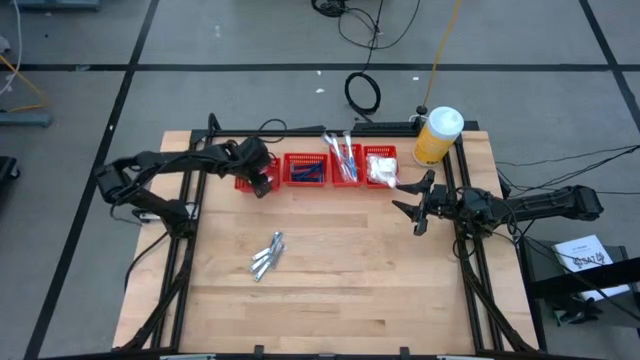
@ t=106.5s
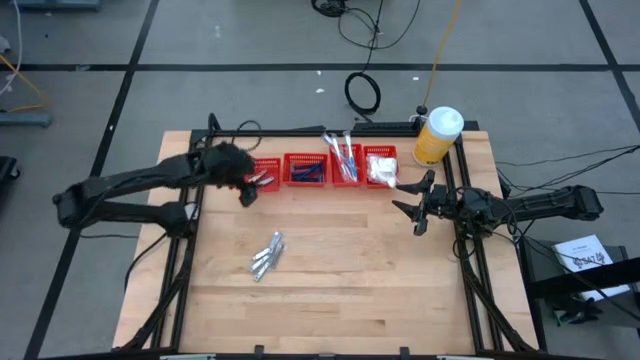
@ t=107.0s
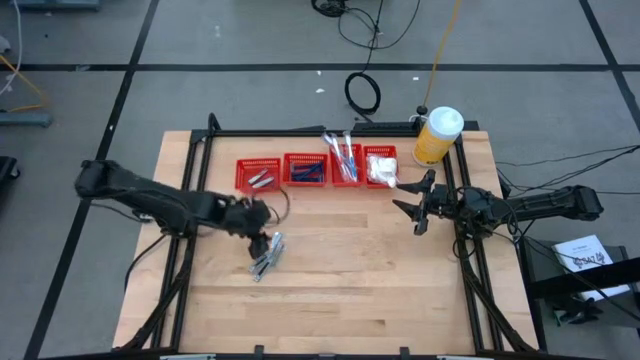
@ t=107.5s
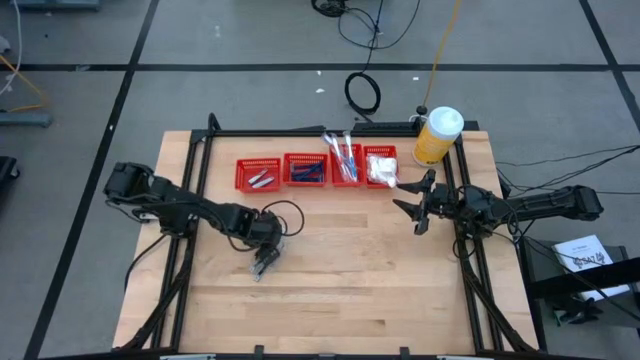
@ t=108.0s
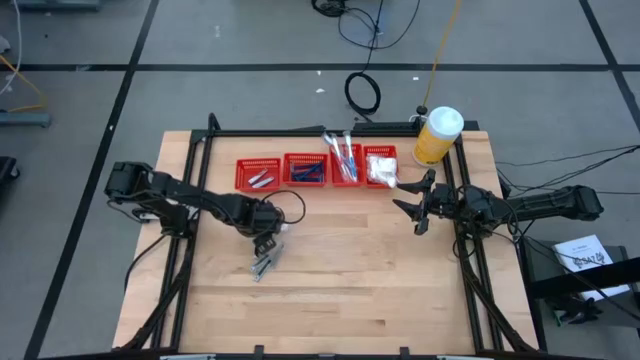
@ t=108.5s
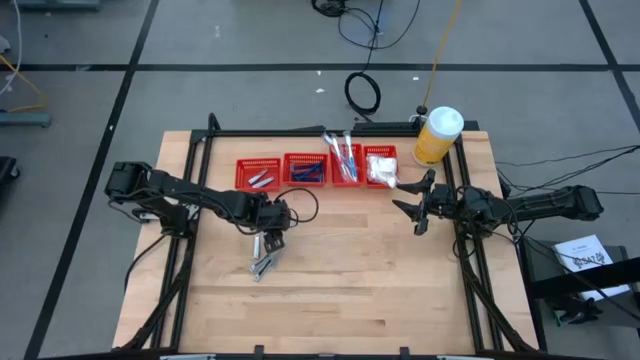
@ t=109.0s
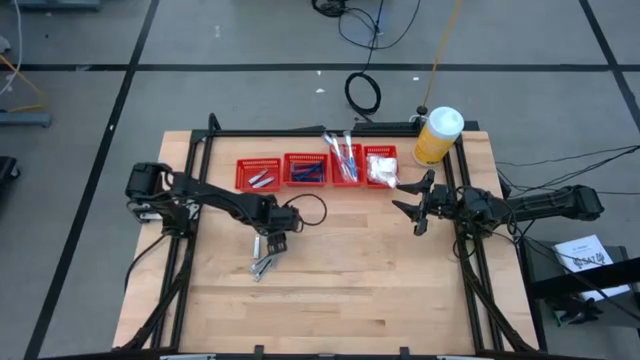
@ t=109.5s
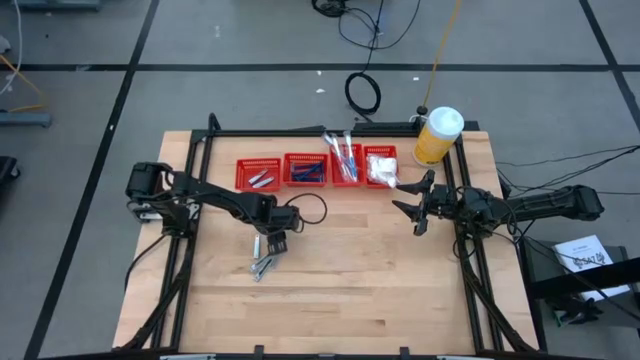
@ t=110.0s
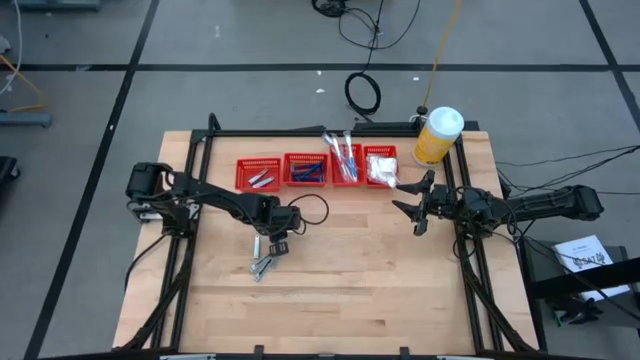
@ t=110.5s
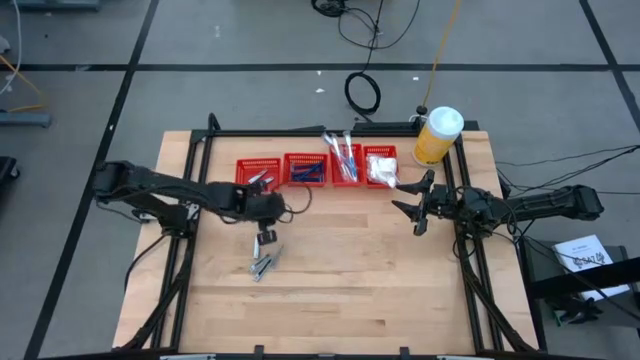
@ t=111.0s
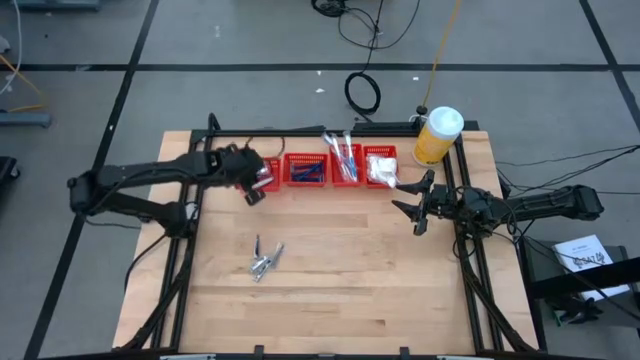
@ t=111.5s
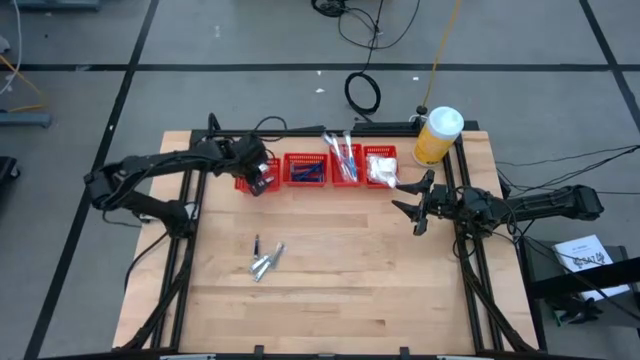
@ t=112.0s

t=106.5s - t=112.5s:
Task: Pick & Place Travel size toiletries
Put the nail cutter into the horizontal left red bin

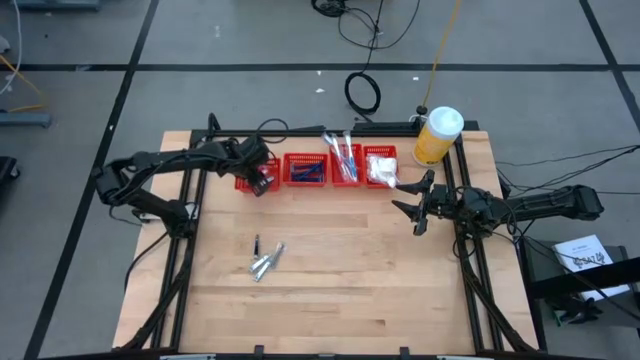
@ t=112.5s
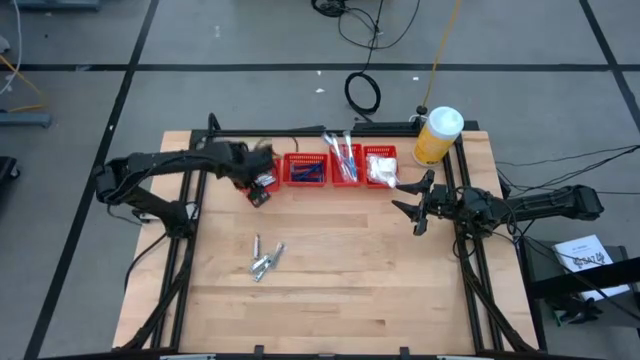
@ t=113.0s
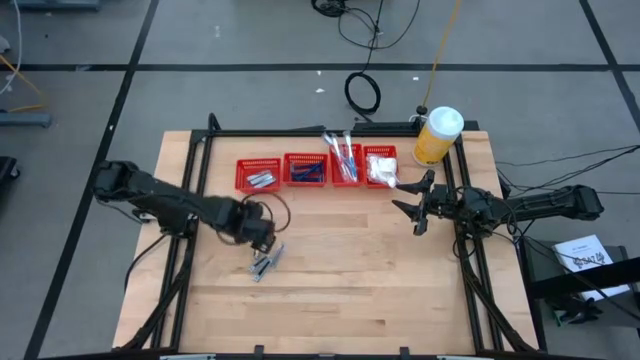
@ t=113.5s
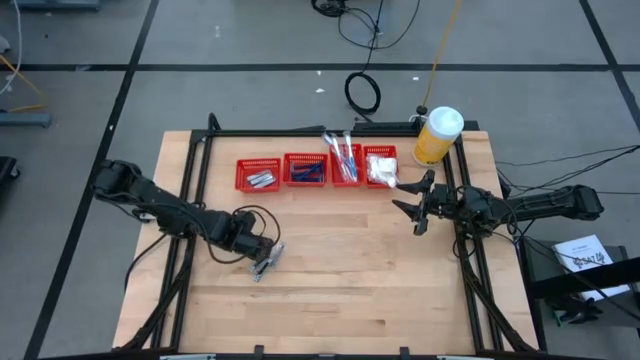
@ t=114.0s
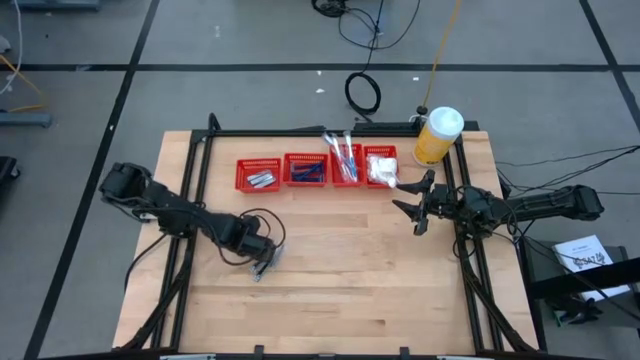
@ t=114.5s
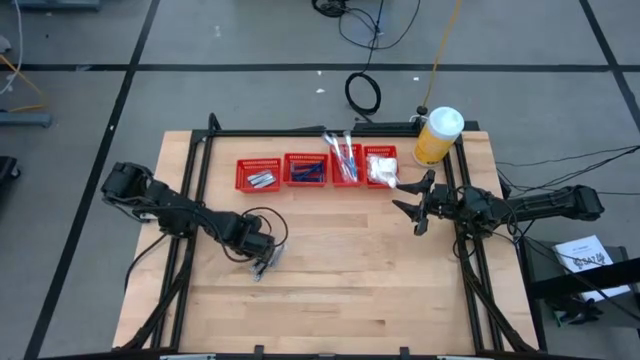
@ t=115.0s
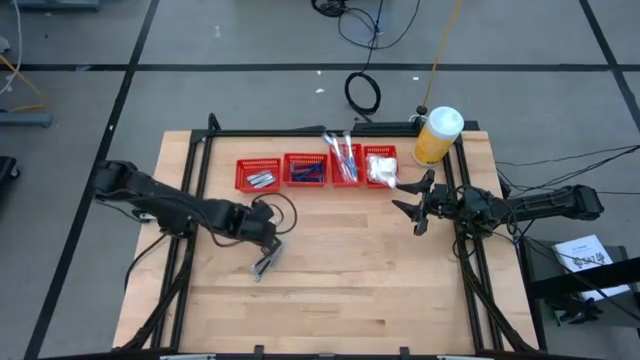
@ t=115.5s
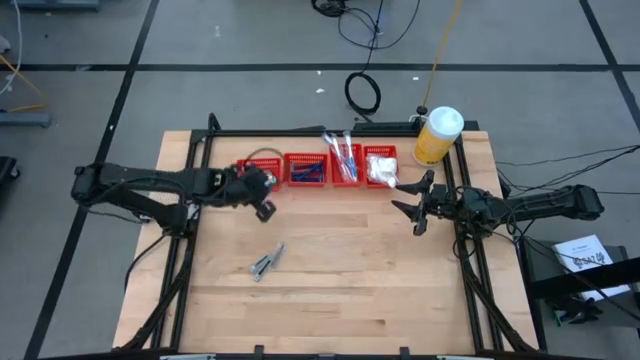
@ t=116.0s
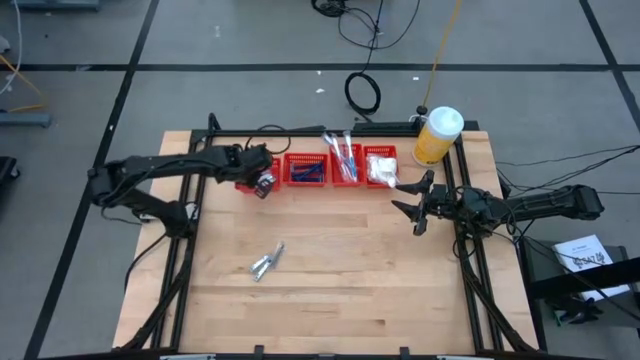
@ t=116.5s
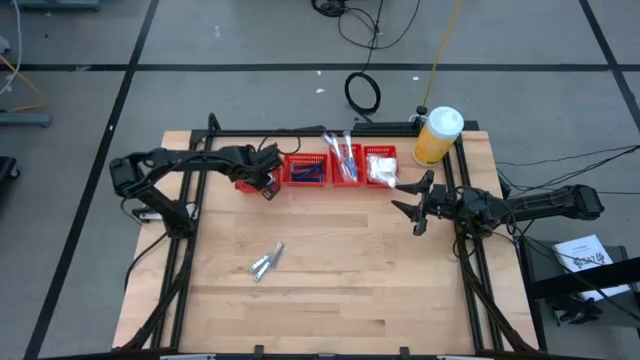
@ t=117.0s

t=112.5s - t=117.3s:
Put the top left nail cutter into the horizontal left red bin

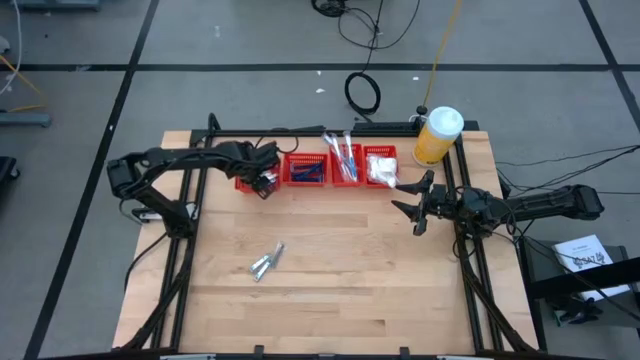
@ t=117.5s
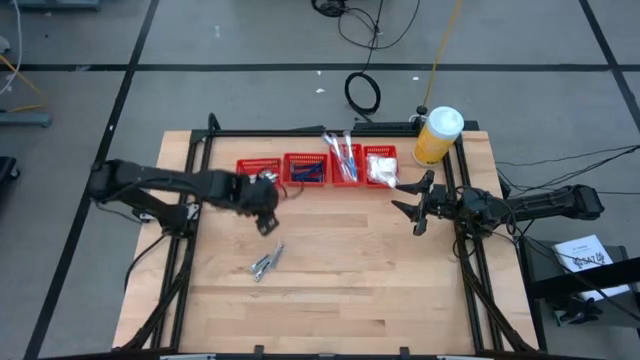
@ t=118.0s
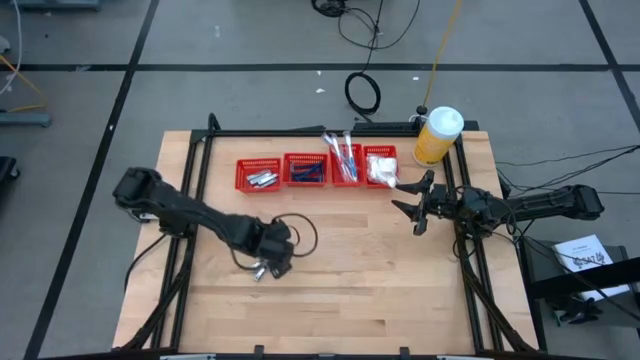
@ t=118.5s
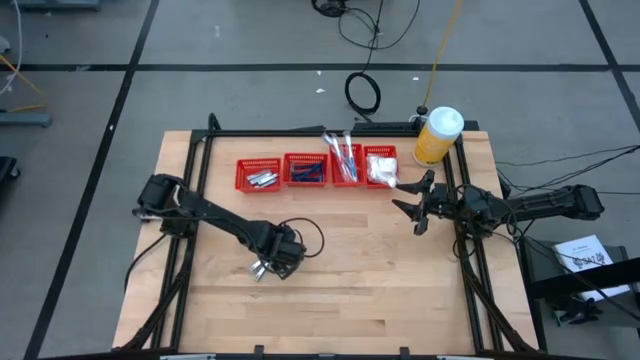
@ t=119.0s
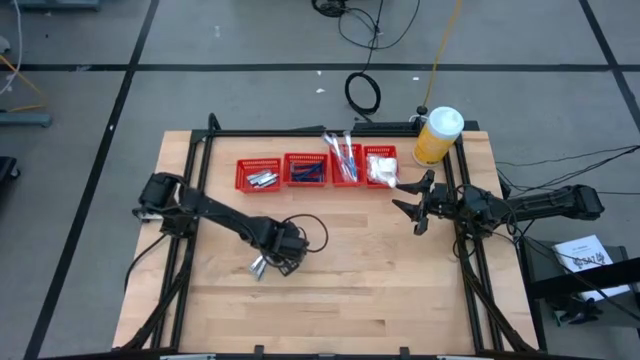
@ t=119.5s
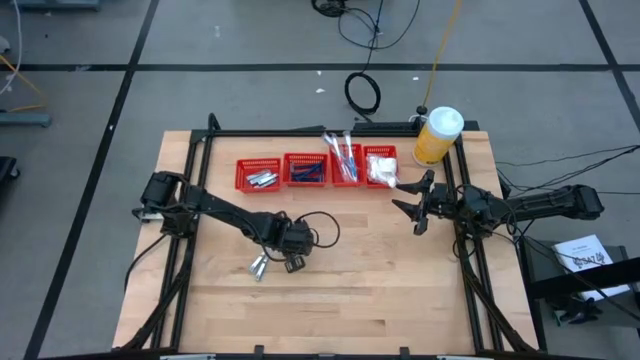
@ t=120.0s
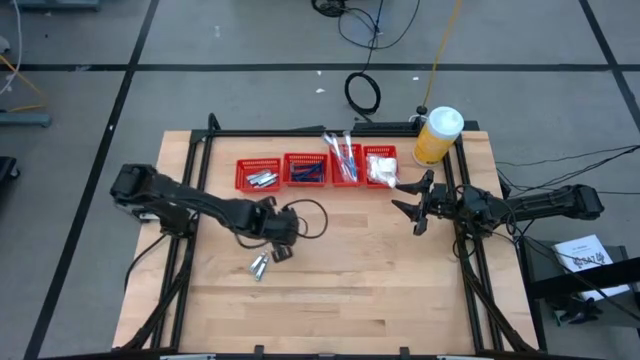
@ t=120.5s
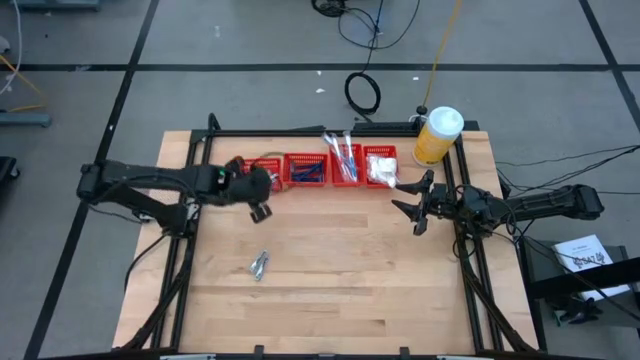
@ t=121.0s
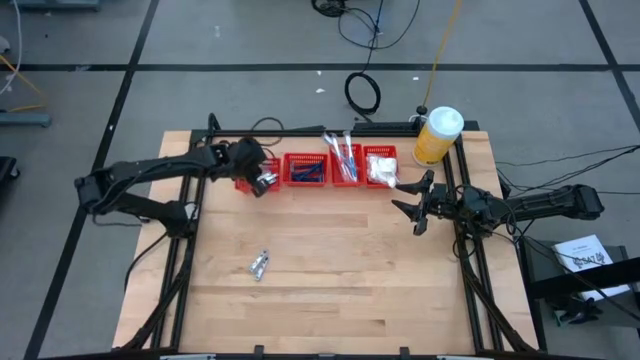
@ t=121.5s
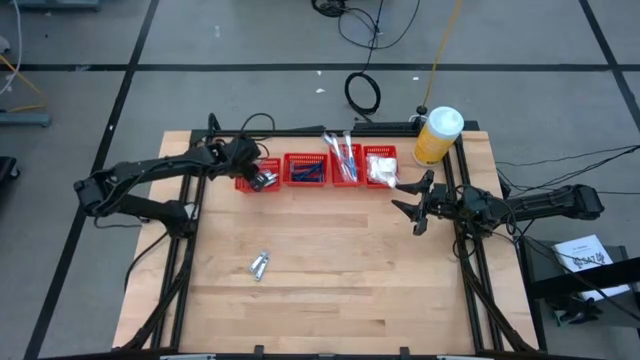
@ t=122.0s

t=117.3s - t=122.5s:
Put the right nail cutter into the horizontal left red bin

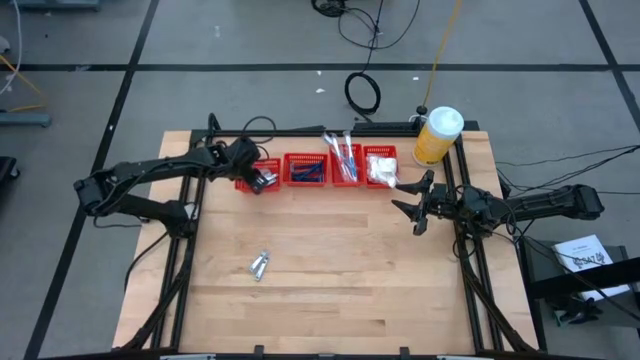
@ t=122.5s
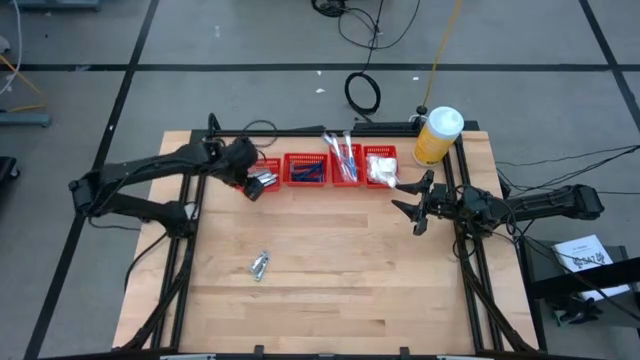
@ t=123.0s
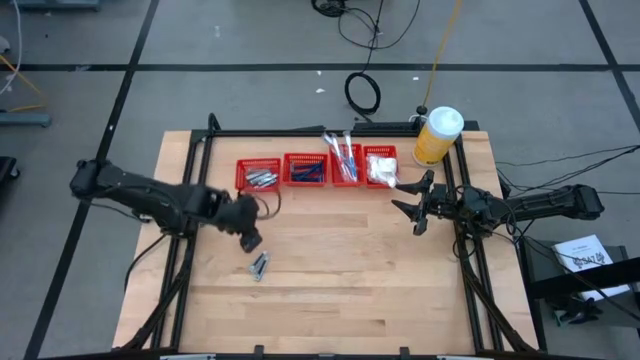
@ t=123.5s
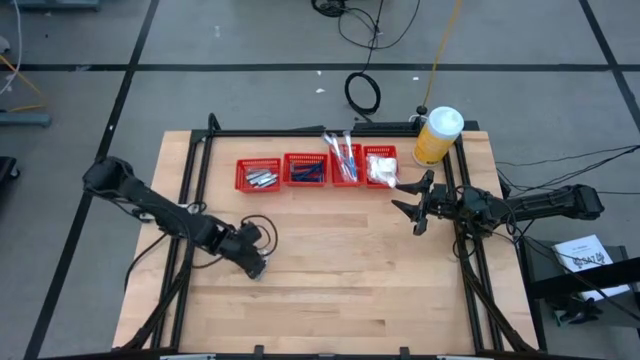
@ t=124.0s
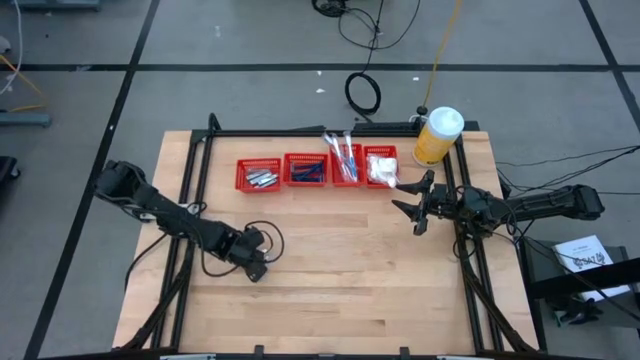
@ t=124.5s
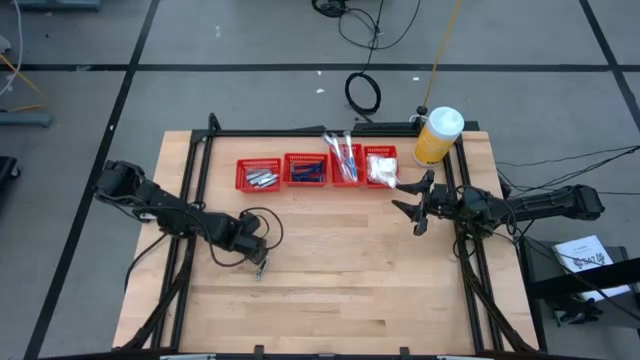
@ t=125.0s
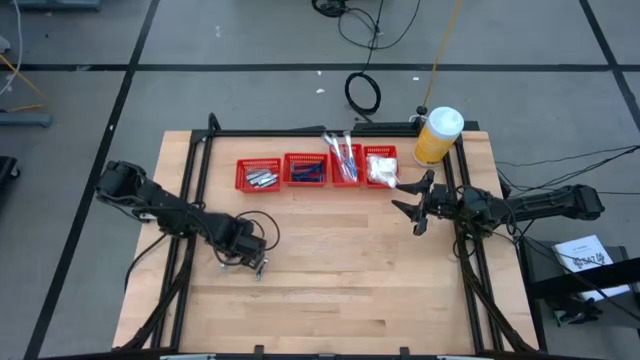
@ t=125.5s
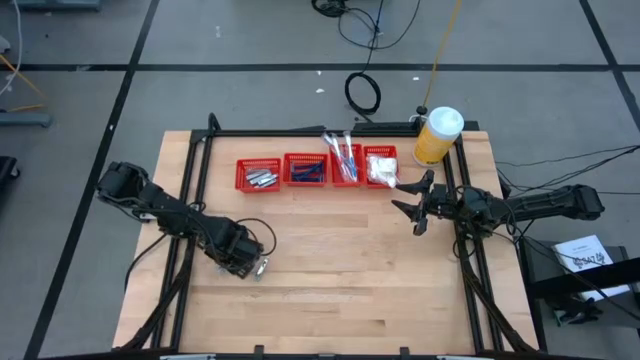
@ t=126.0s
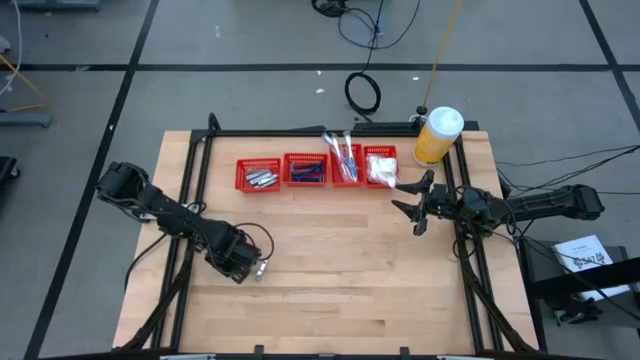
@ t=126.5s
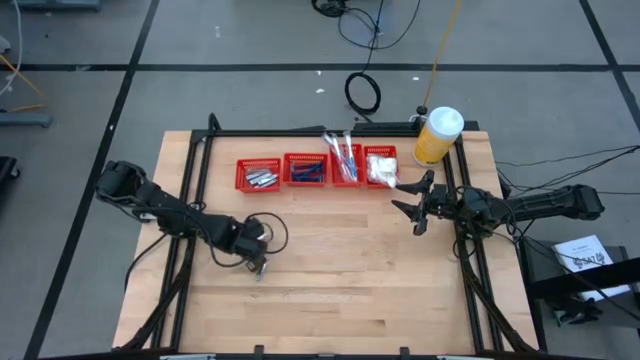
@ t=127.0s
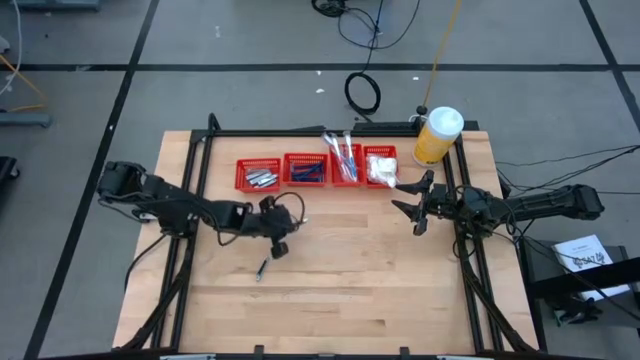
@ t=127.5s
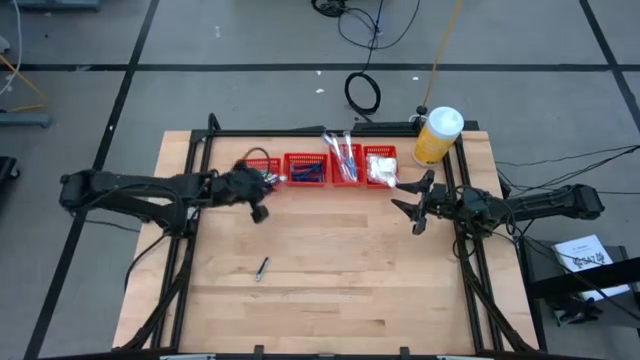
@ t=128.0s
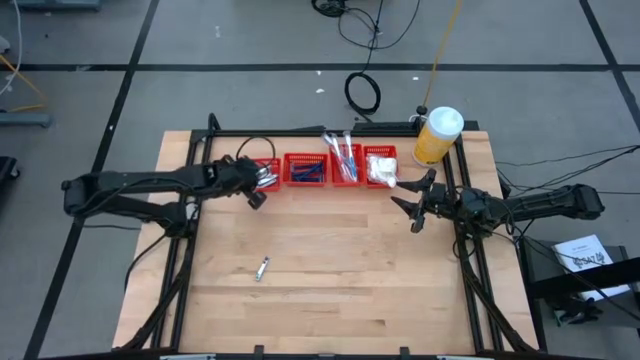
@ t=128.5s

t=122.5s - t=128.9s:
Put the left nail cutter into the horizontal left red bin
